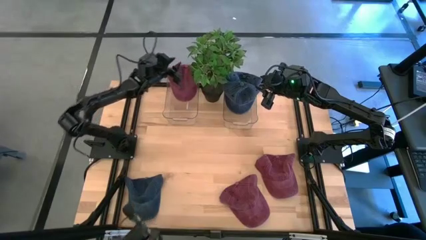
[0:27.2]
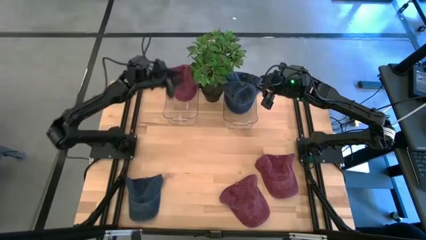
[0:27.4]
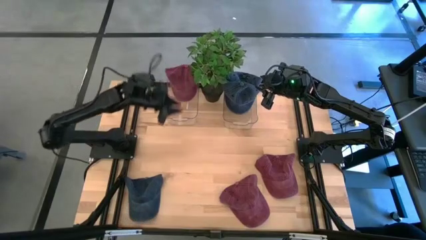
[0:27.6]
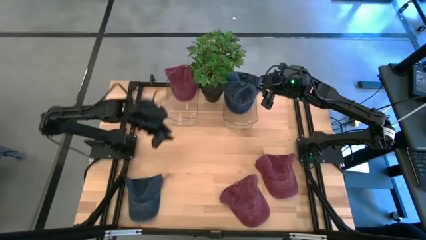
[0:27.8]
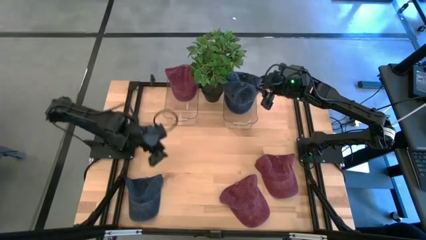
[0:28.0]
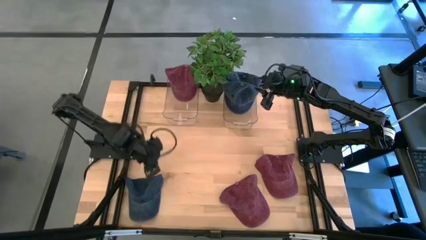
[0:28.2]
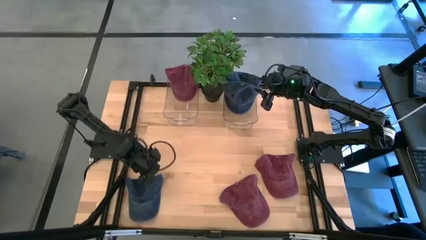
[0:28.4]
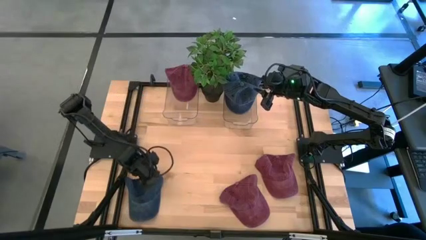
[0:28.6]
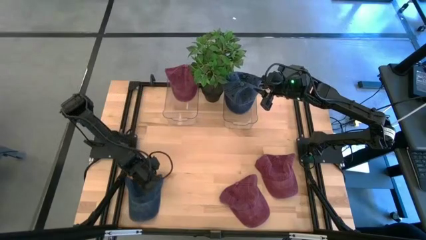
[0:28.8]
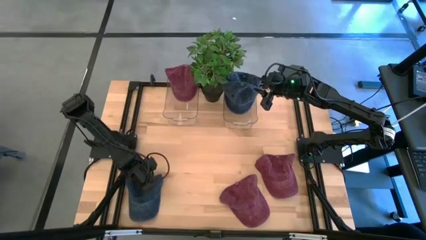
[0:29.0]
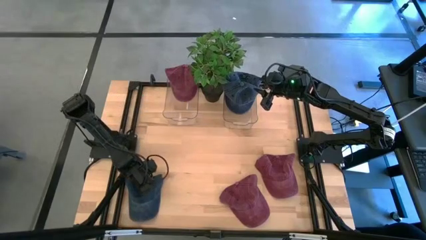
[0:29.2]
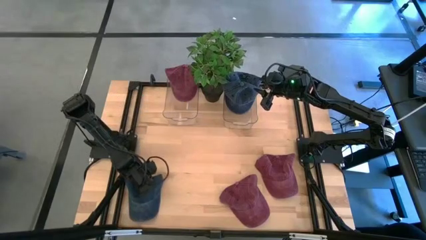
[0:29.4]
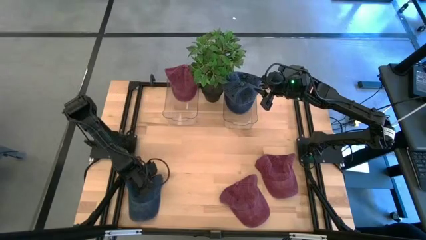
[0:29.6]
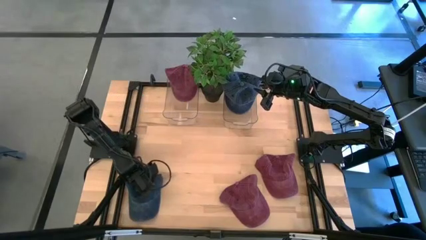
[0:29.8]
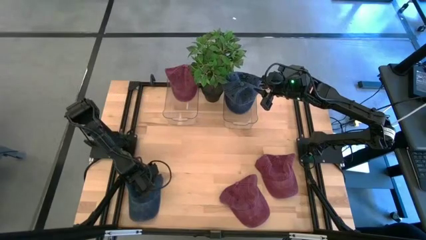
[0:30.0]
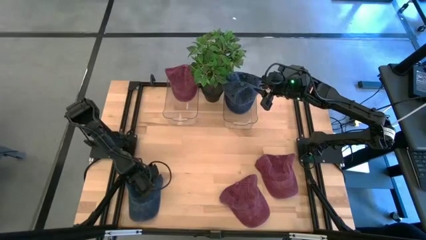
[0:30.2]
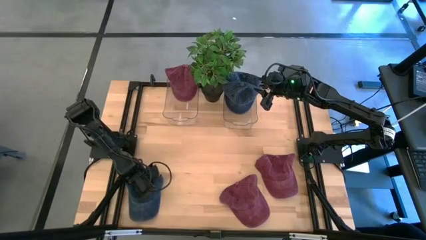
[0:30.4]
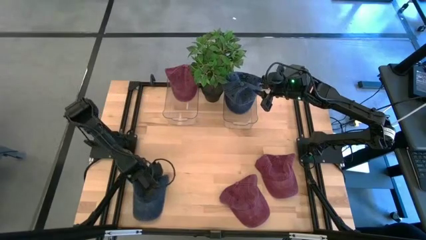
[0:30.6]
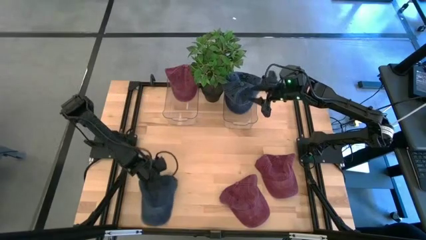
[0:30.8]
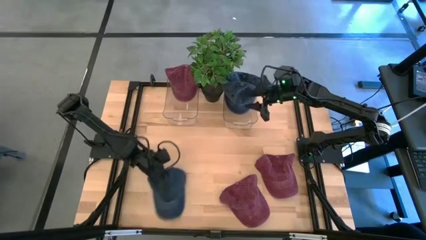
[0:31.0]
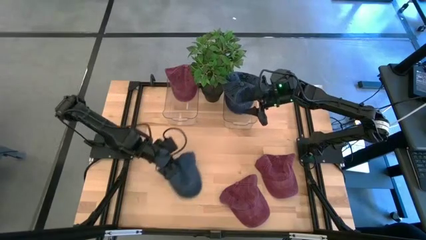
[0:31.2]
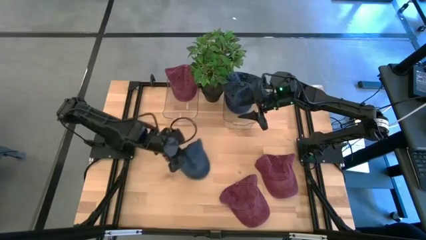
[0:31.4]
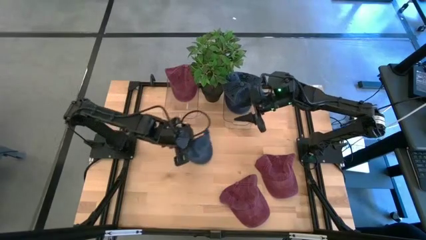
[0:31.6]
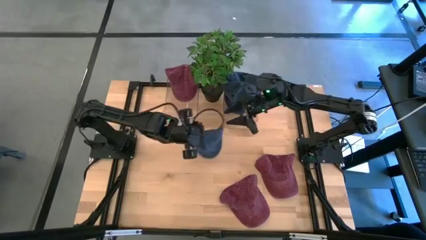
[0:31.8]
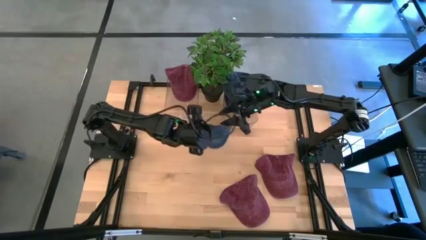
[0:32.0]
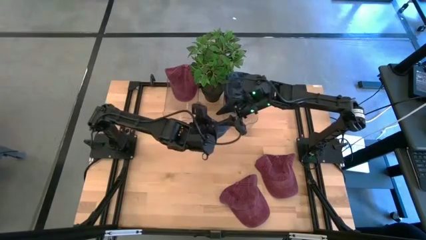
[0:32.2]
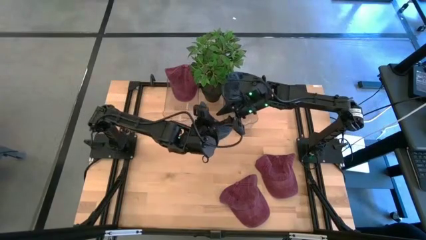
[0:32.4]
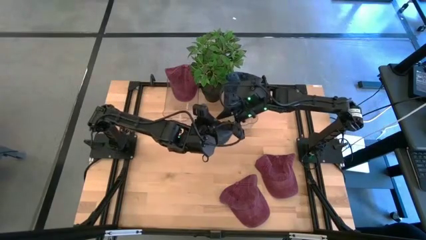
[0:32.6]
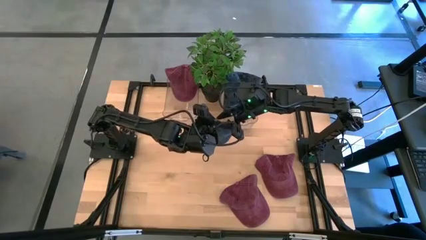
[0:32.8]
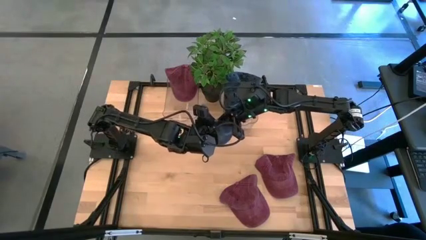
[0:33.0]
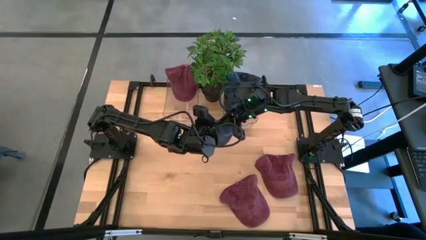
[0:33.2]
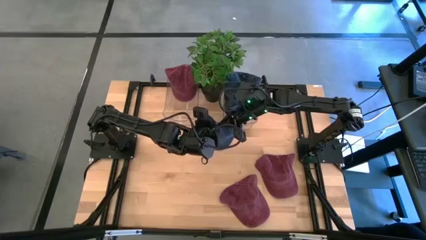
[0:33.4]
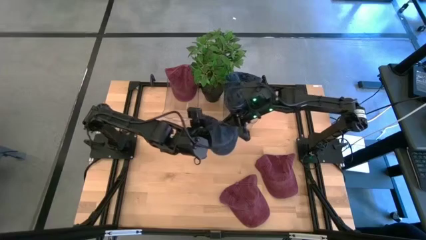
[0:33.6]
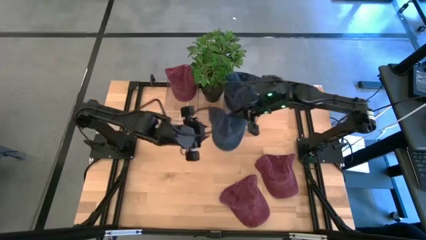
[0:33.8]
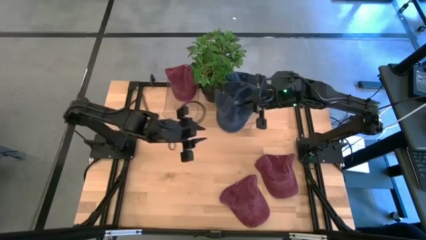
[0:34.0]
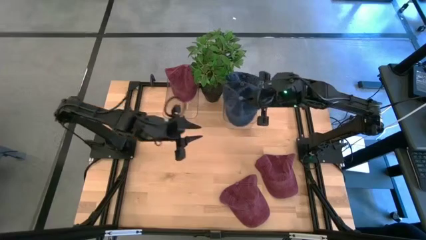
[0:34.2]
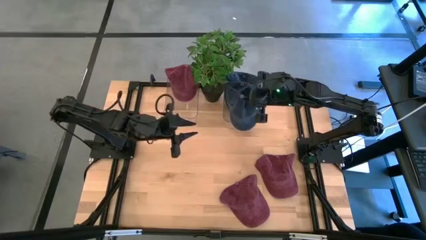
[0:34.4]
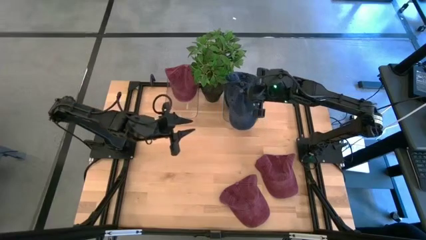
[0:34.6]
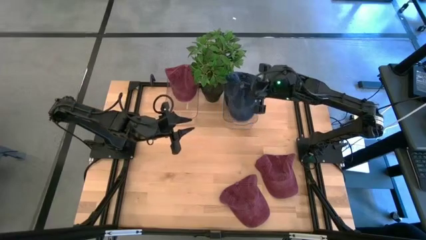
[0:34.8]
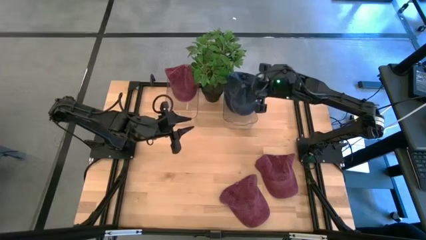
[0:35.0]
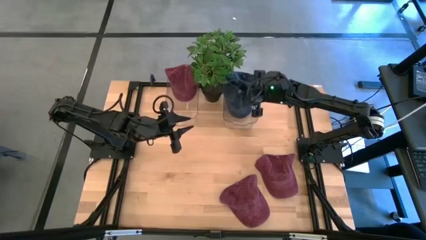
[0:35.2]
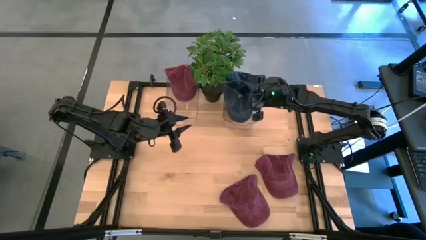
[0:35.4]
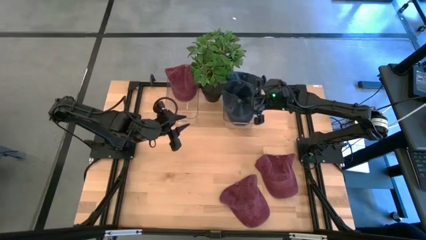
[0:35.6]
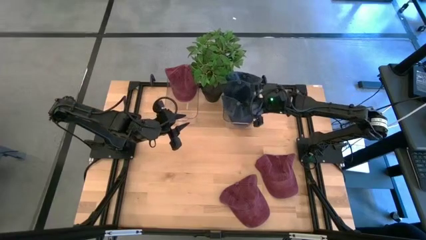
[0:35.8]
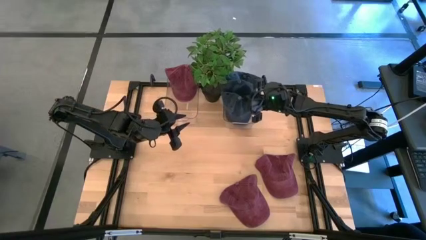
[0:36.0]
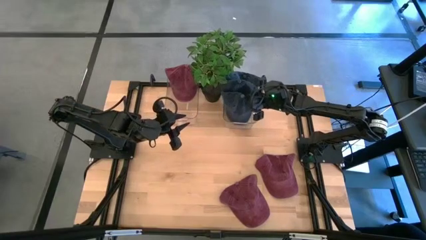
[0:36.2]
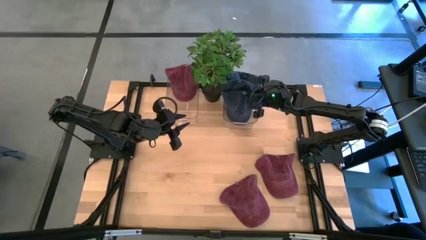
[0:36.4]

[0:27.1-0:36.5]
Task: Pick & Place hat
Put the blue cap into the right transparent bin

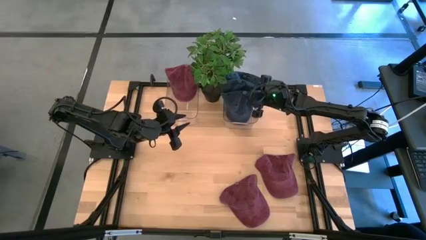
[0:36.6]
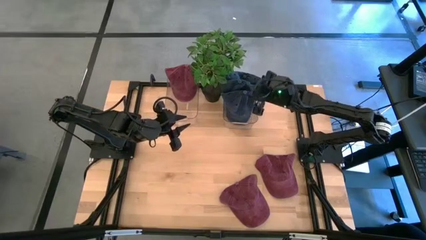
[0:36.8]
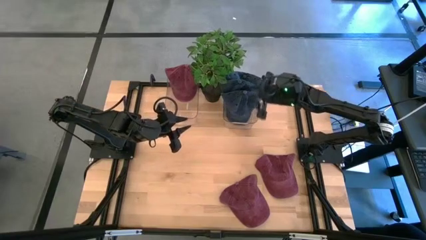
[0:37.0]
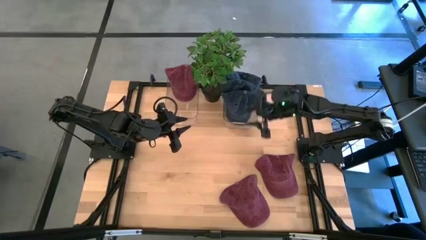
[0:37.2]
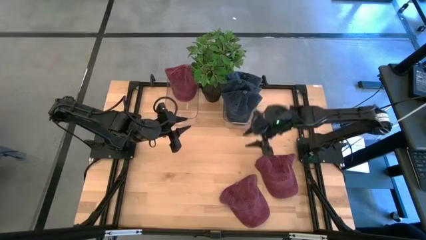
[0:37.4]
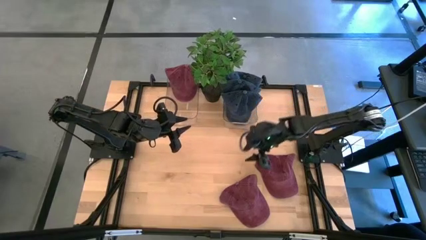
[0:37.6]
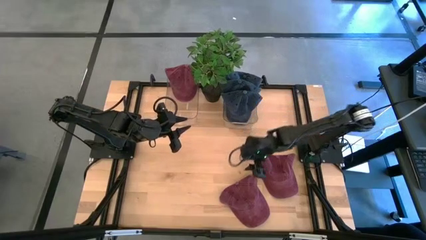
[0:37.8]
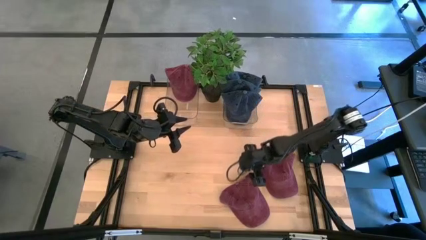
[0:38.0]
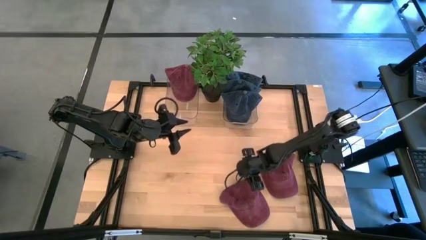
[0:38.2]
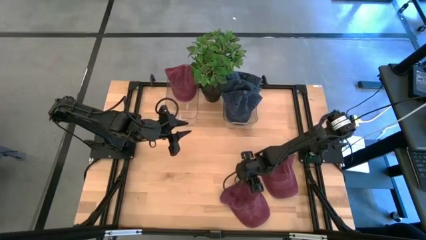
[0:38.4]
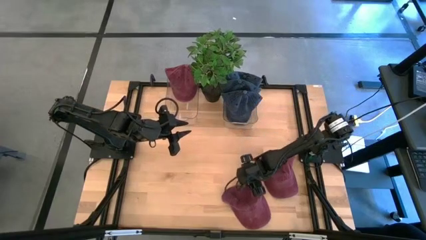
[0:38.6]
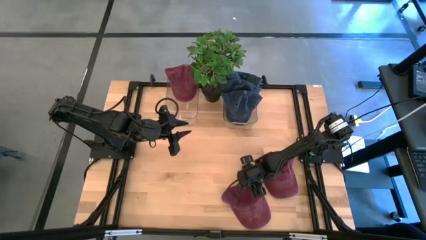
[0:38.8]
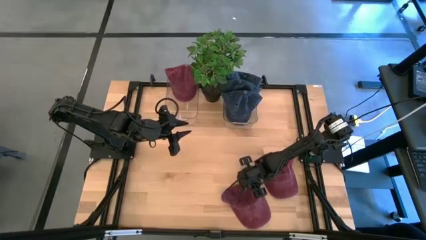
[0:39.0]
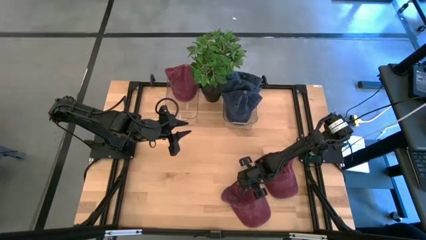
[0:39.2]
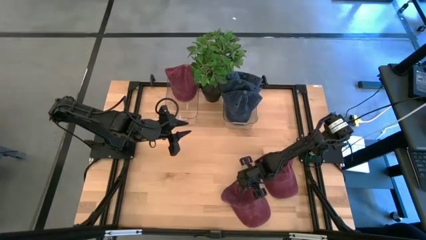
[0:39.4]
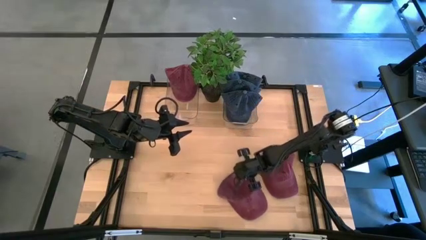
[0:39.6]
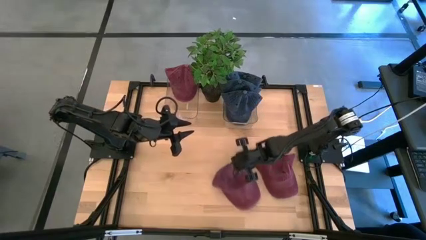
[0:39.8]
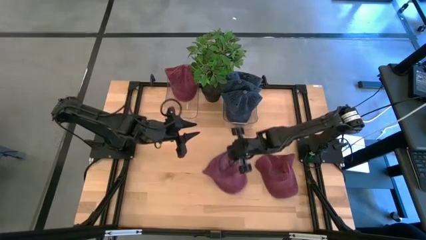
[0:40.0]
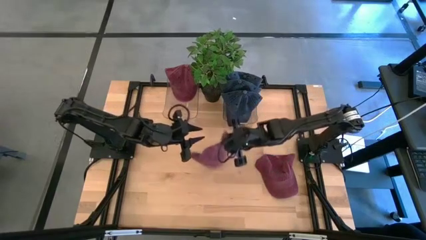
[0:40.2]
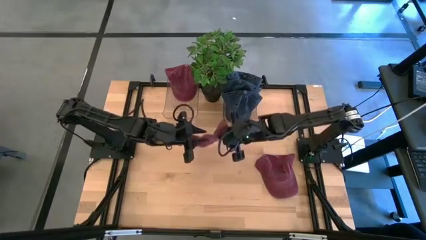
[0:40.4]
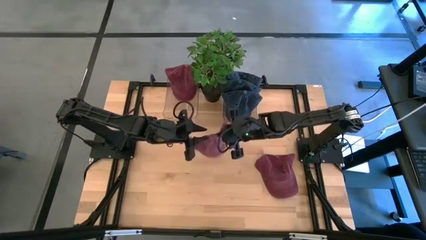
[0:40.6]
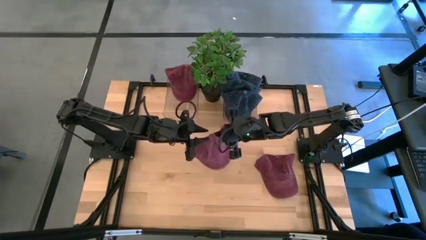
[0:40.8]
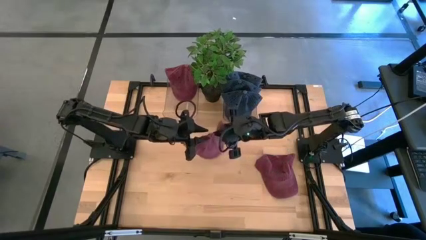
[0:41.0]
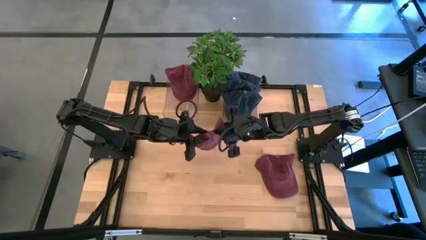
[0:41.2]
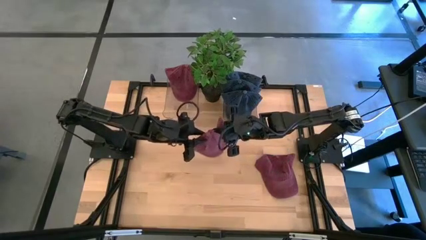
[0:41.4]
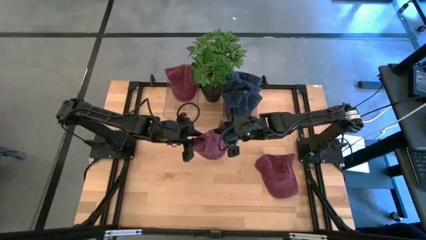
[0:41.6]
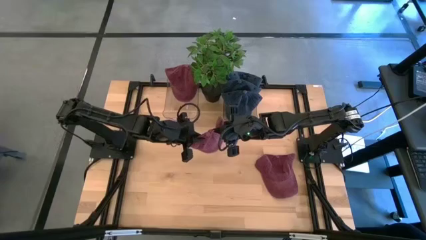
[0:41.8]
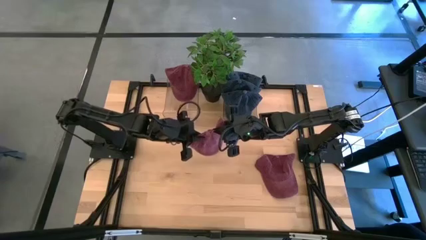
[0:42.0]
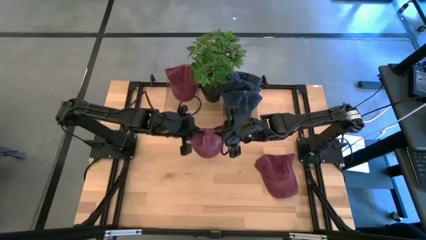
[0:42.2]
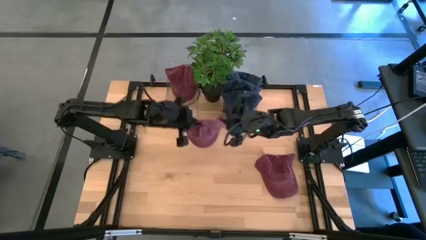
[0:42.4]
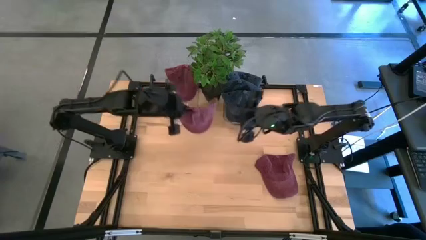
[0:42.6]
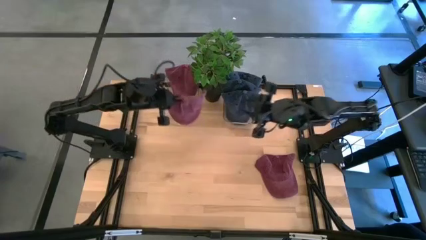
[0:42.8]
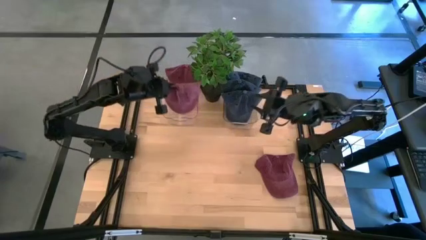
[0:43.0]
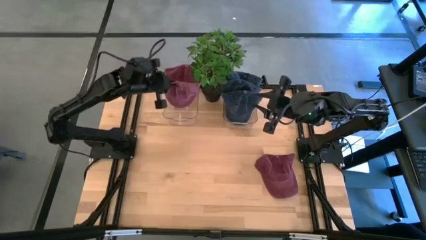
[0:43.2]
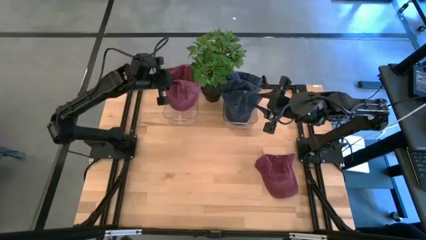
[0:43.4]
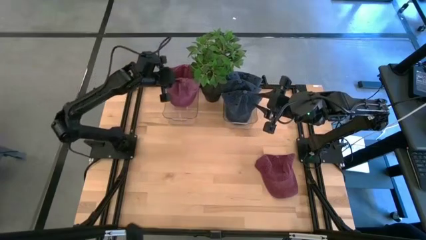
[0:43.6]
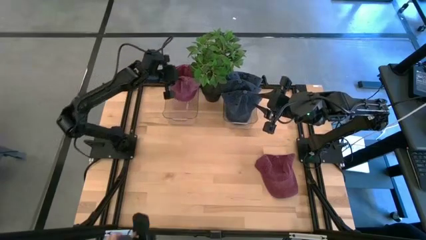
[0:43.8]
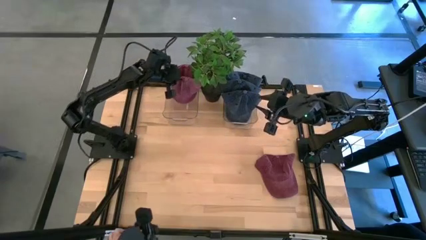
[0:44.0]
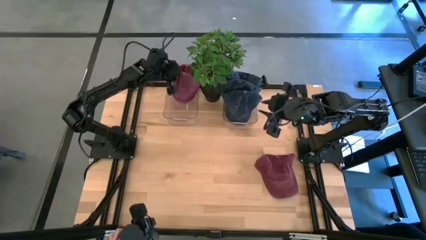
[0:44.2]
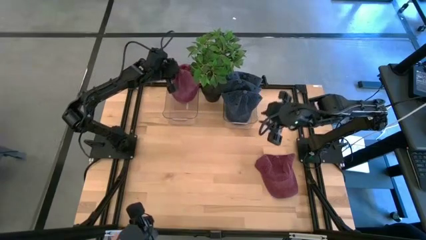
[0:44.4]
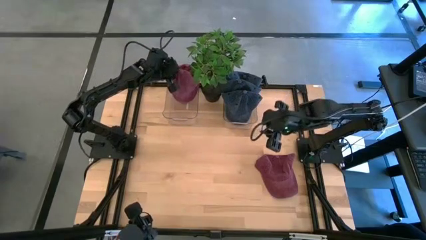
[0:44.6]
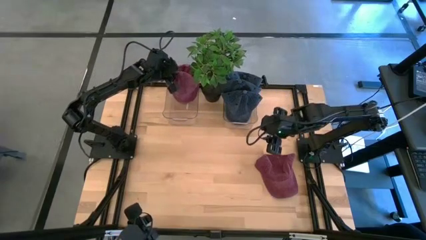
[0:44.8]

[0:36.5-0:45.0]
Put the left red cap into the left transparent bin
